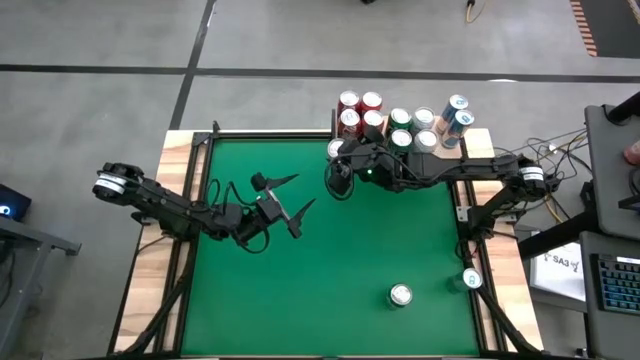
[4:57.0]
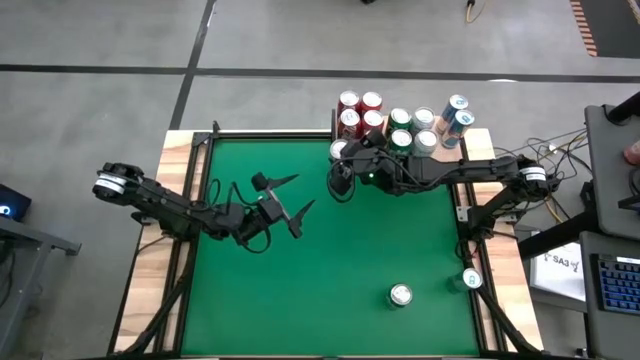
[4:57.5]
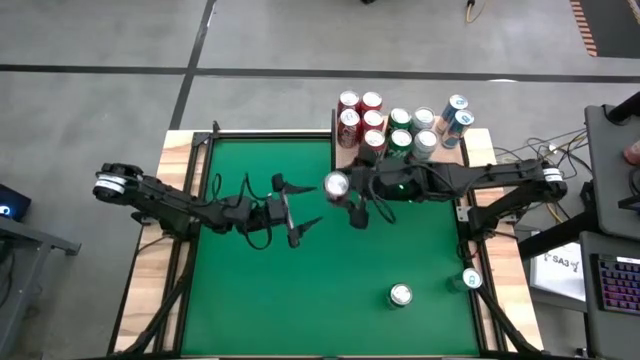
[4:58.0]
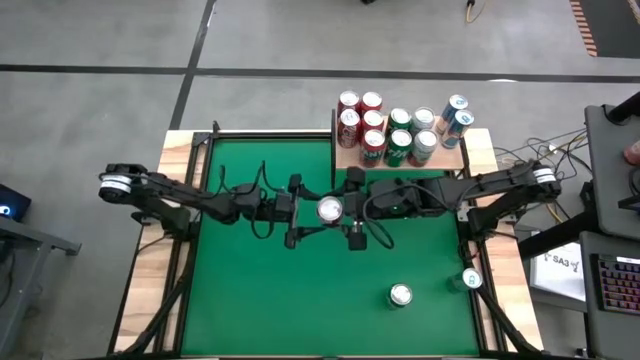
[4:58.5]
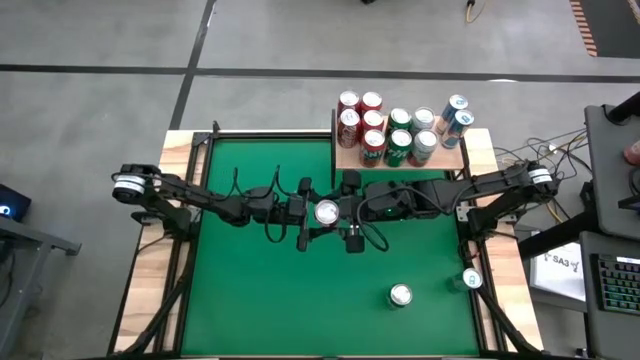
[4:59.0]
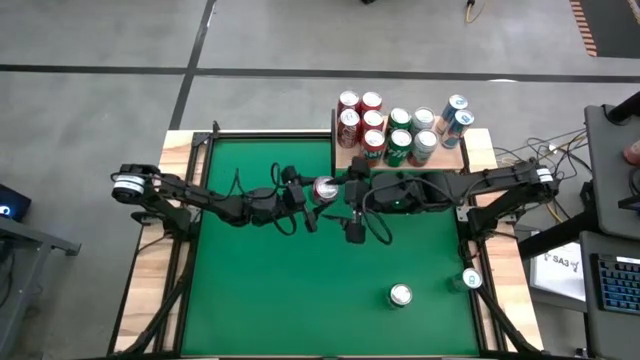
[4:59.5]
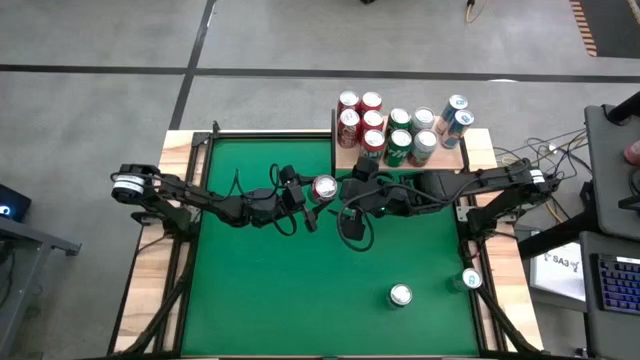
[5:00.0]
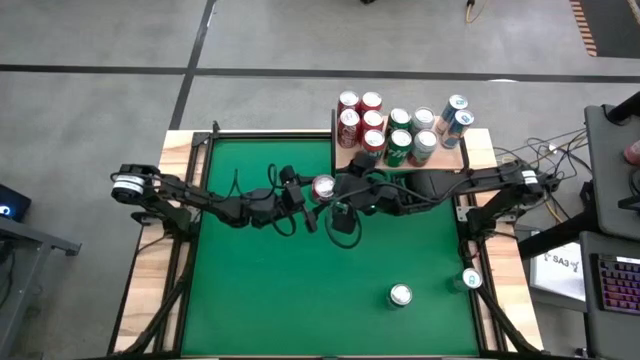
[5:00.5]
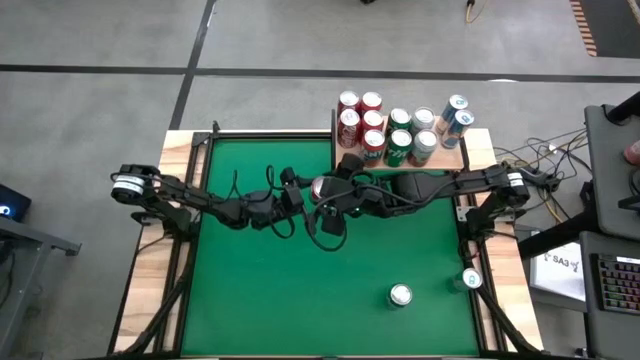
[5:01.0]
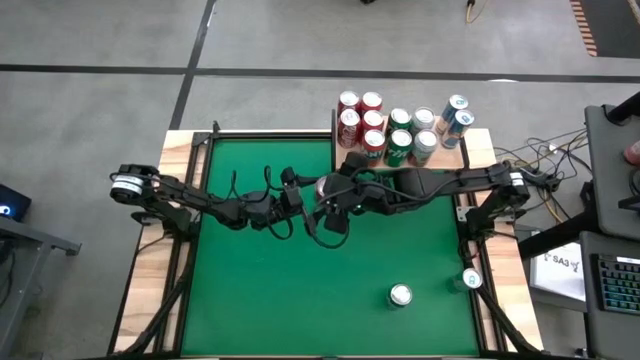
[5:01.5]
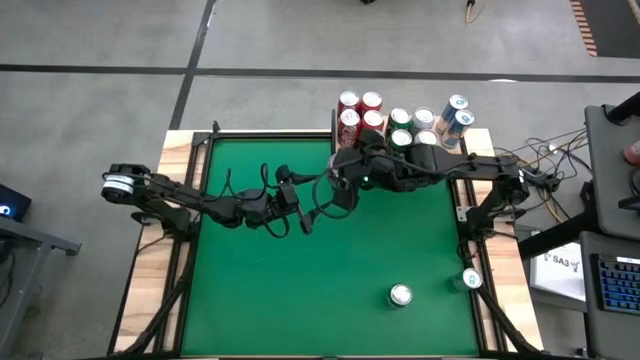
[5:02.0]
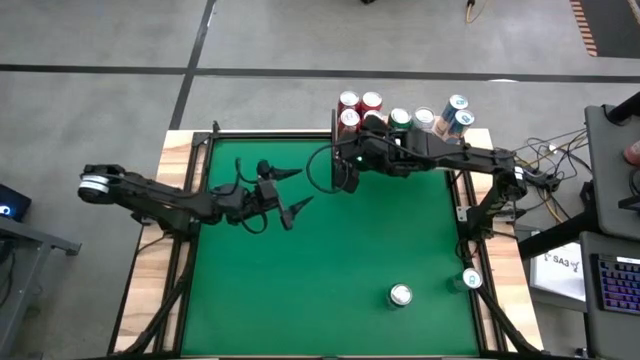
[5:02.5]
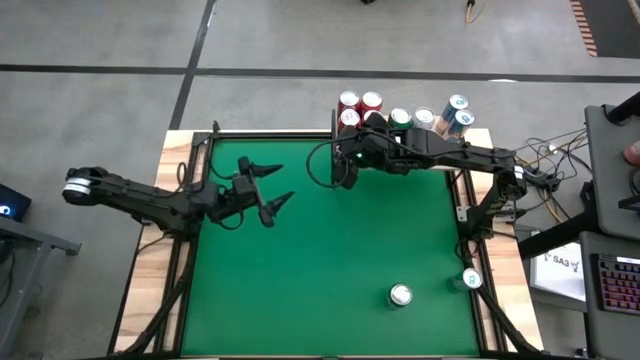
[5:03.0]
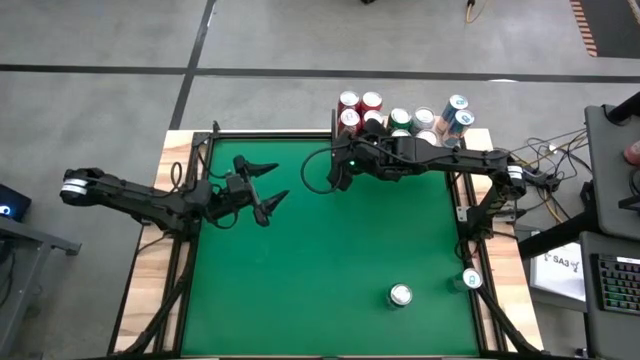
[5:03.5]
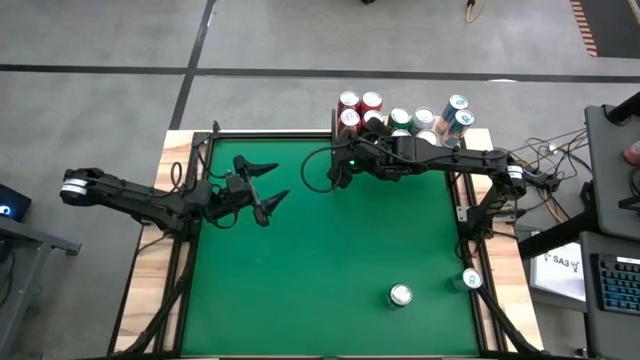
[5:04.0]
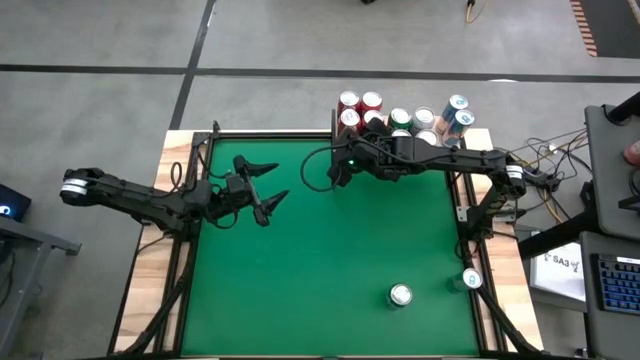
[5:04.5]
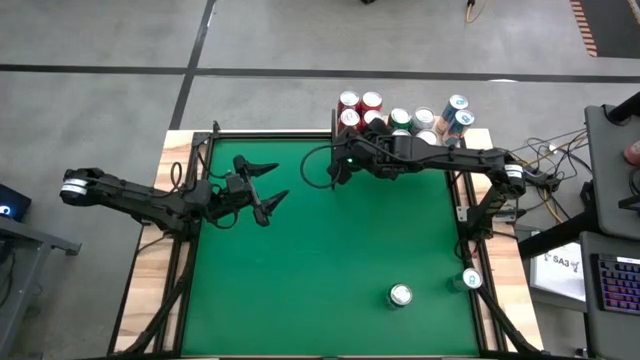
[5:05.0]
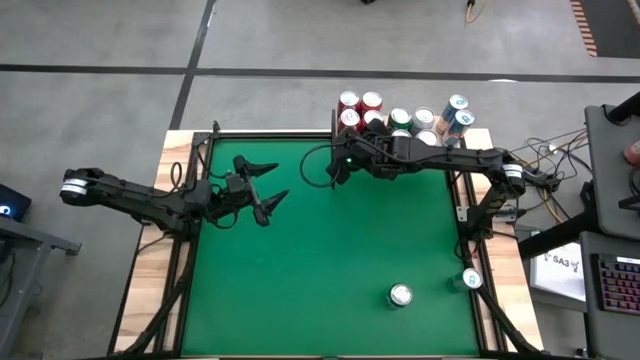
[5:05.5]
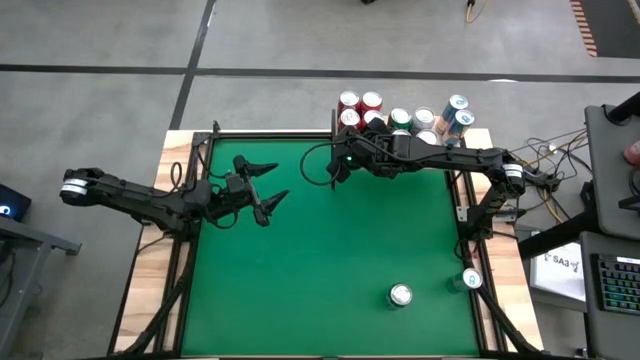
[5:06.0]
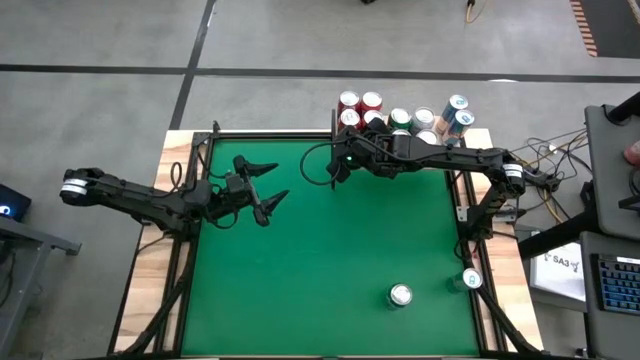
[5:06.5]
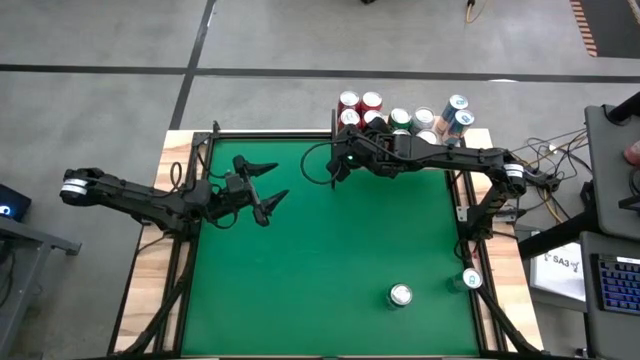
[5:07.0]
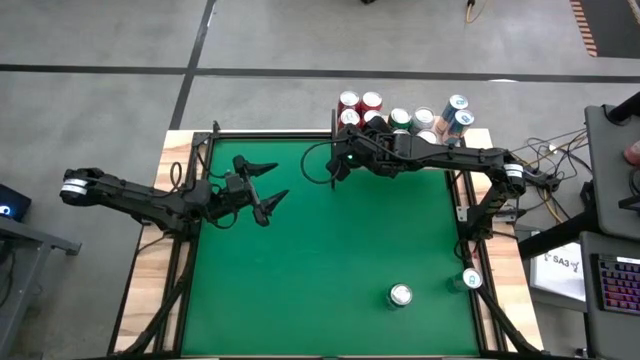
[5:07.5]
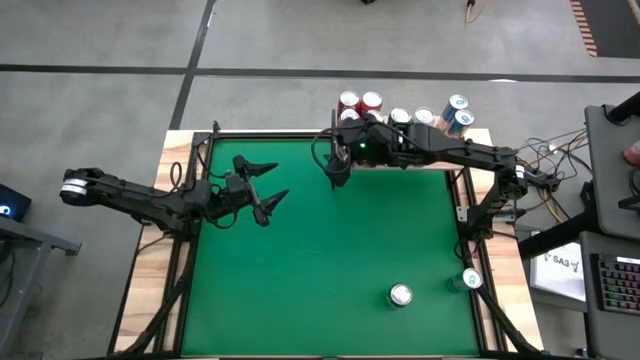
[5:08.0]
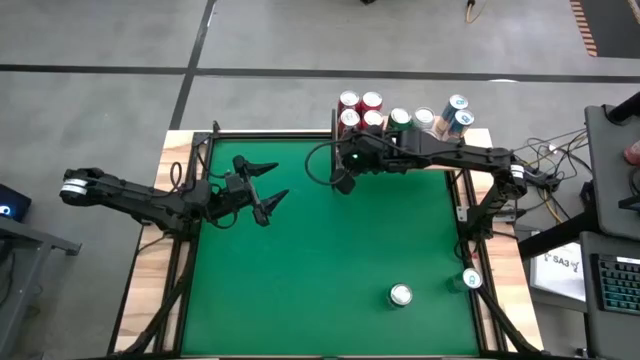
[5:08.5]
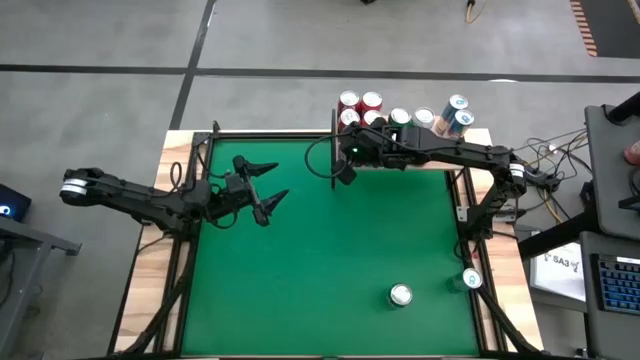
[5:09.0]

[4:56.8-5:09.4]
Task: Place canned beverage on shelf
Put the red-white soda can on the shelf aligned with the other red-white soda cans

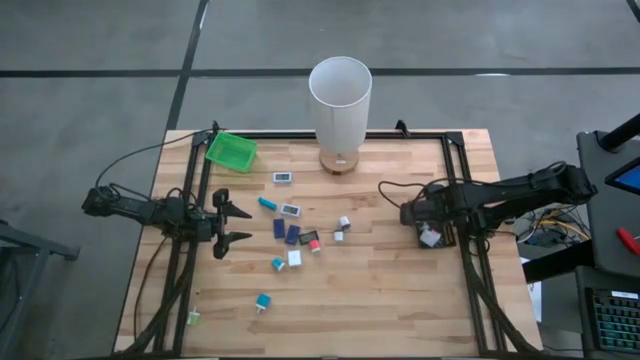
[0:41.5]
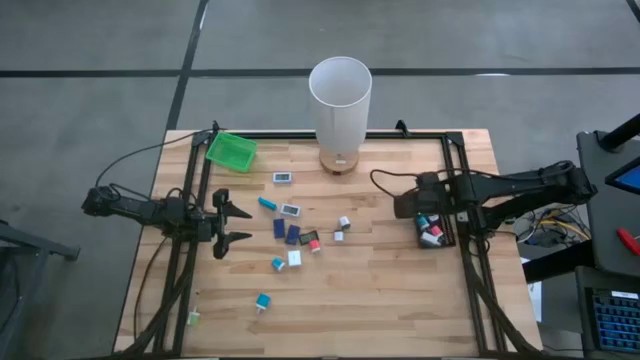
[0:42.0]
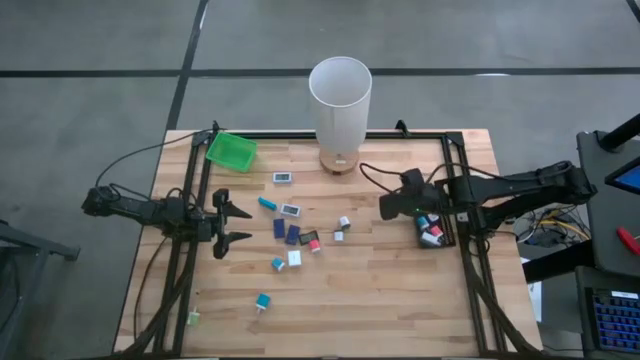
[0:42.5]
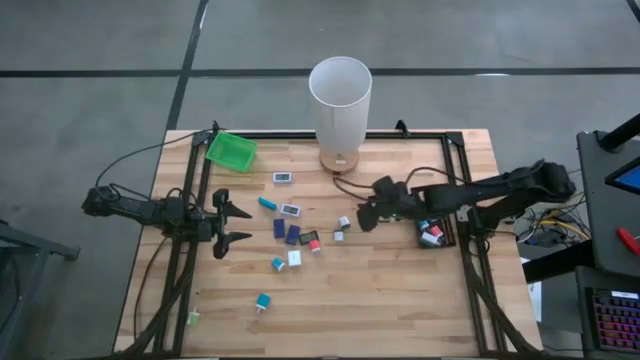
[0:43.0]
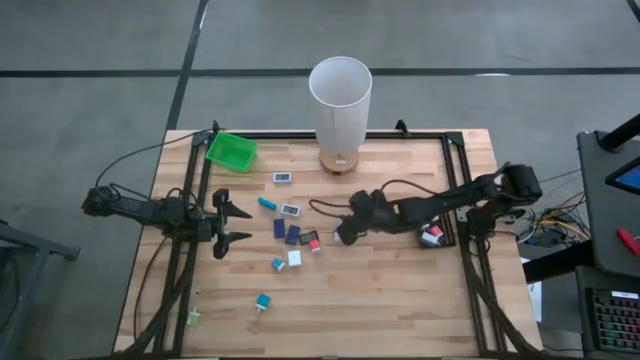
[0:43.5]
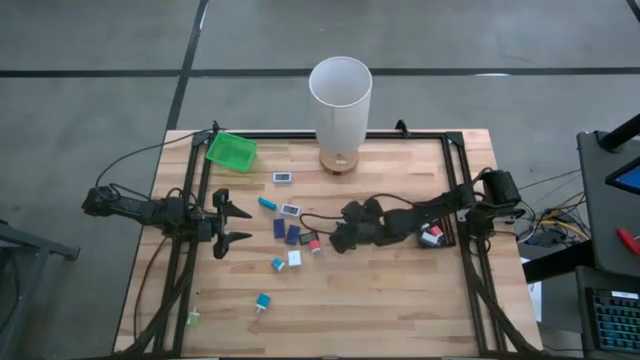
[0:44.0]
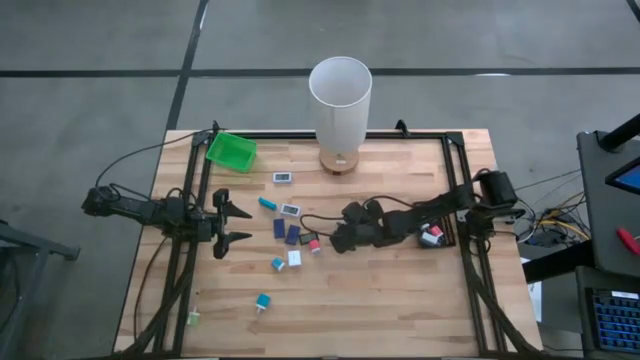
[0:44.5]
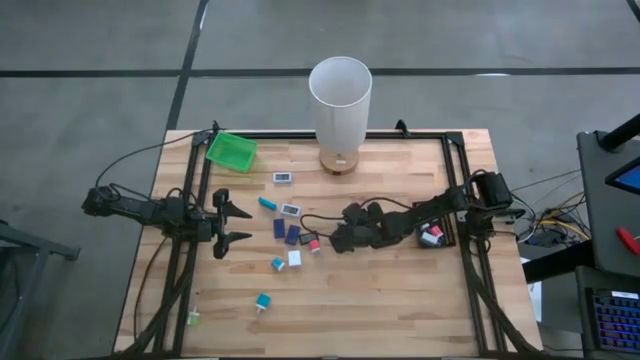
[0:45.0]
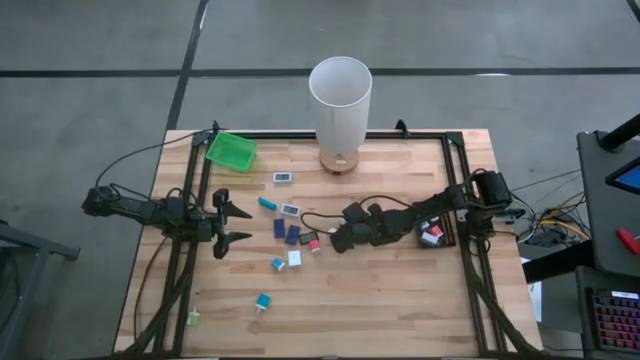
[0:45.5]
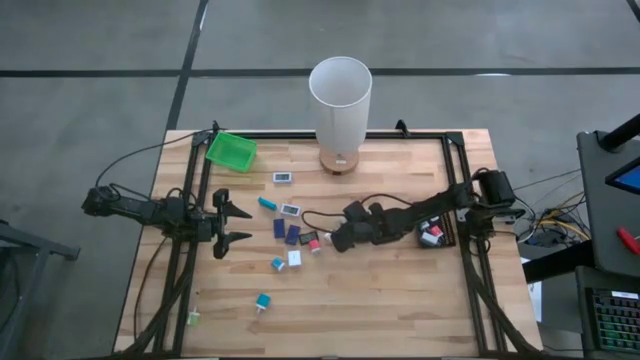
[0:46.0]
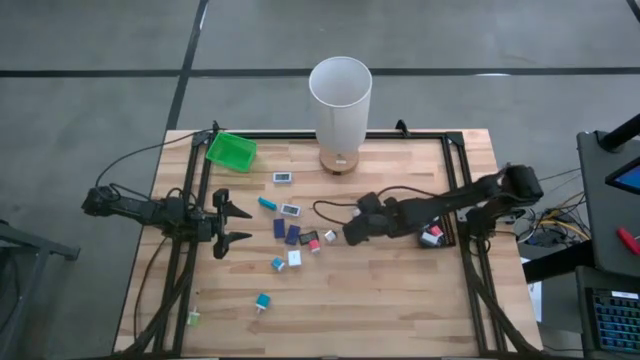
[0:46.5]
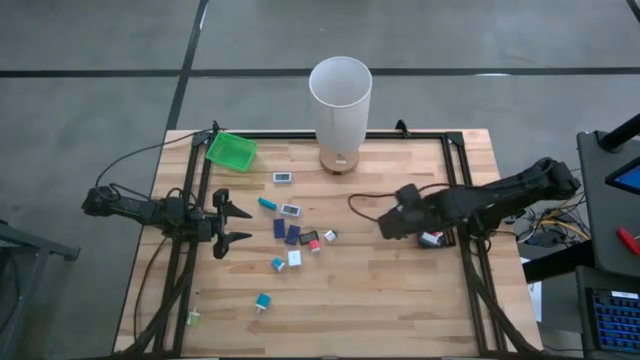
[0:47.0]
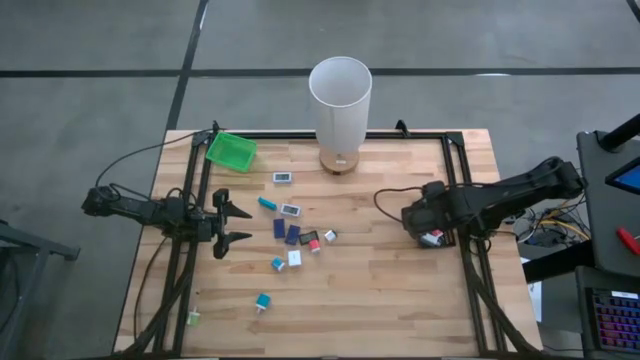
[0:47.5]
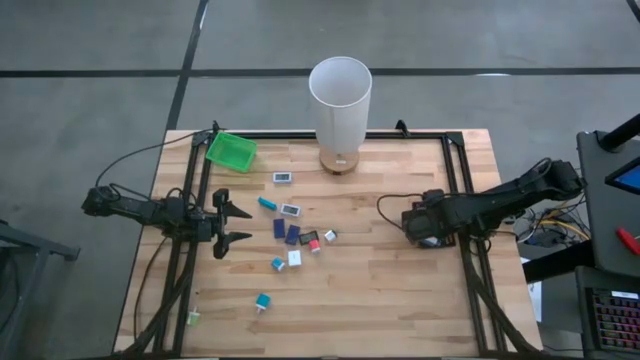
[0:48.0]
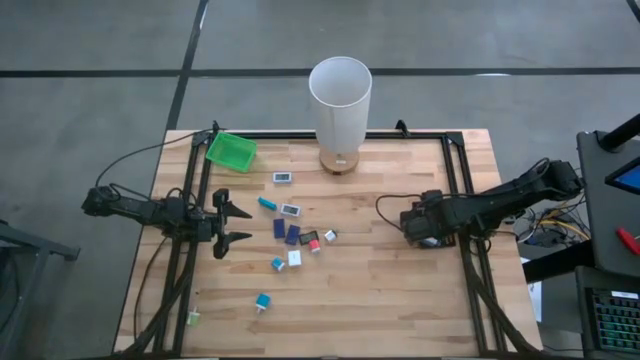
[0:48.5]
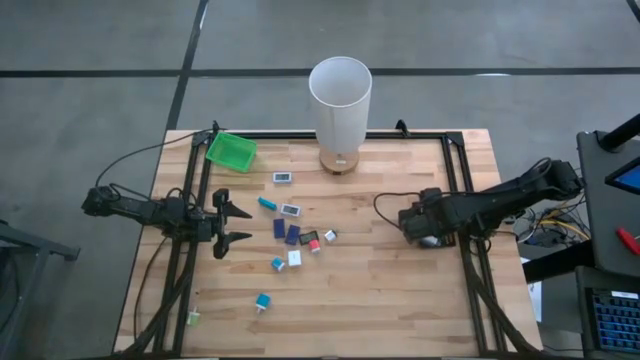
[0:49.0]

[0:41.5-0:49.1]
Task: Pick & Place Office items
Put the top white black charger adapter into the black bin

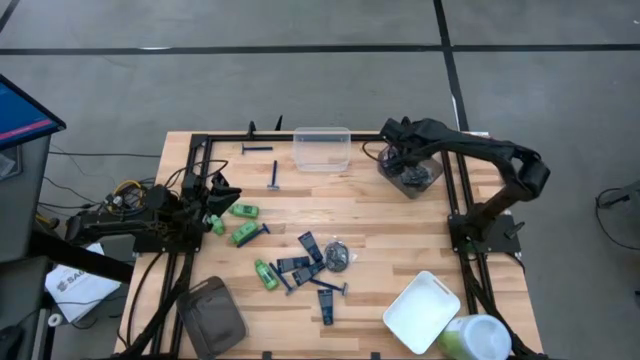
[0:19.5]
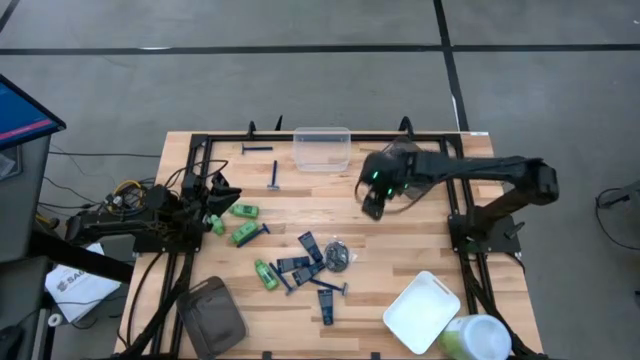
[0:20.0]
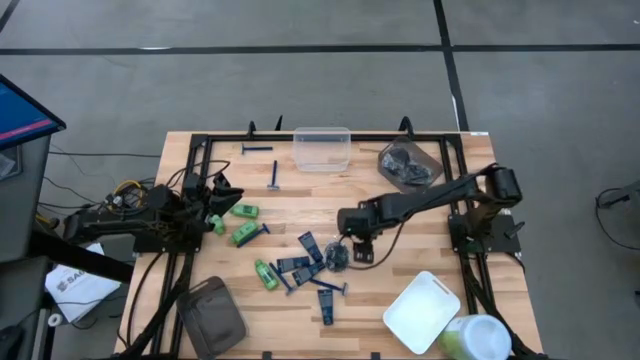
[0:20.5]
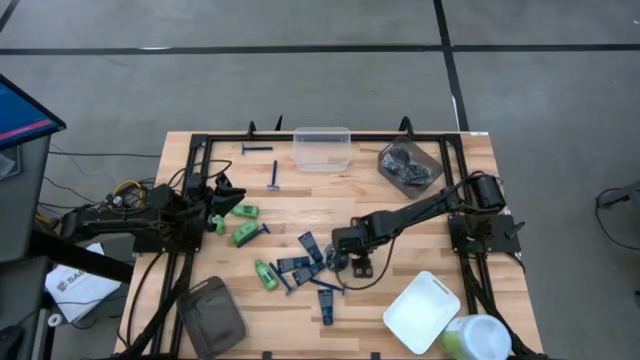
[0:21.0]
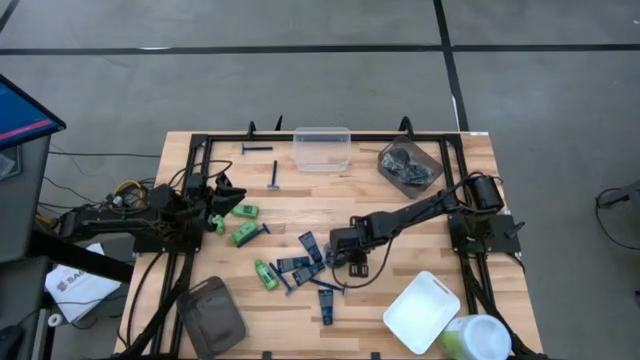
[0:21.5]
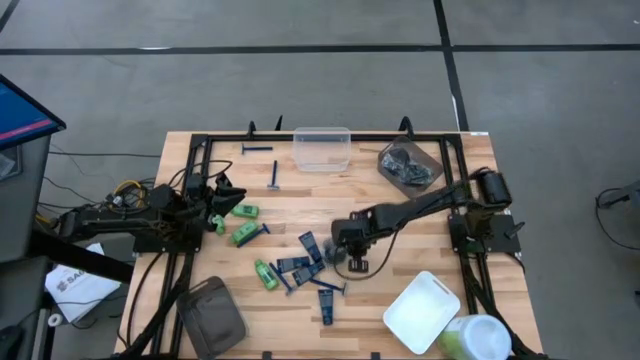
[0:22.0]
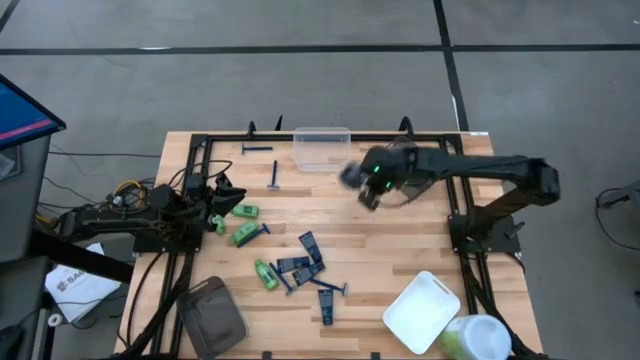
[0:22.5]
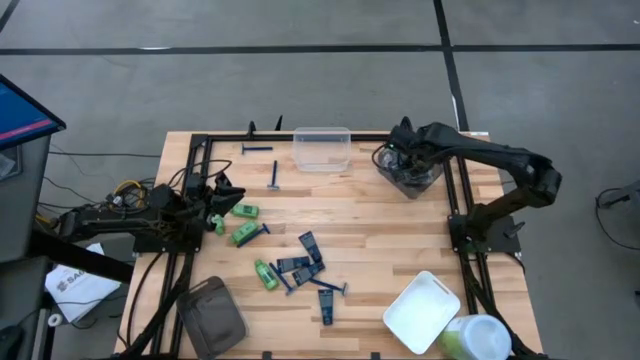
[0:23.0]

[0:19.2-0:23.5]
Task: Pick & Place Travel size toiletries
Put the black hairbrush into the top black bin
